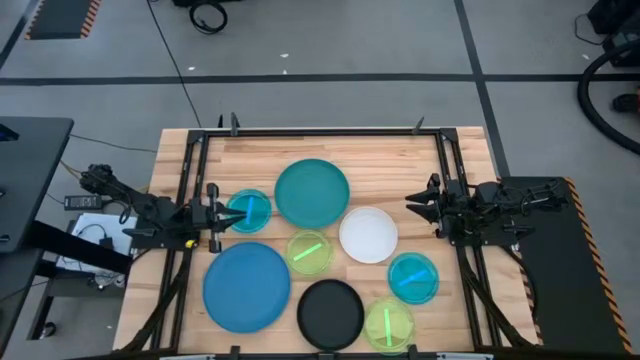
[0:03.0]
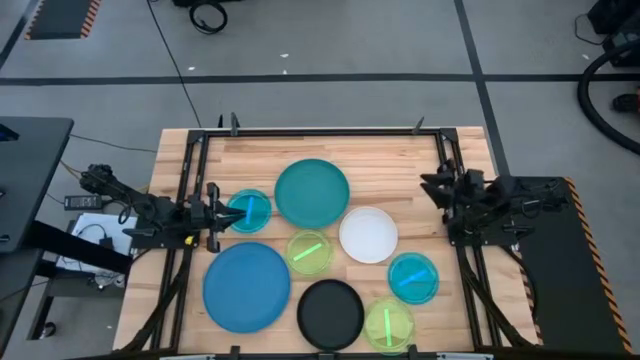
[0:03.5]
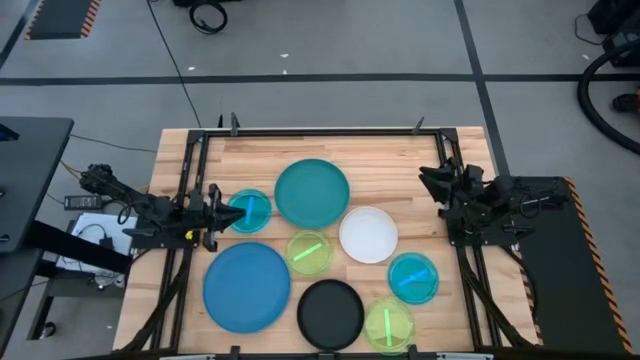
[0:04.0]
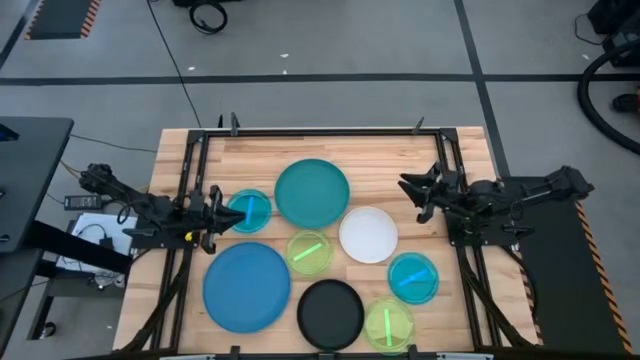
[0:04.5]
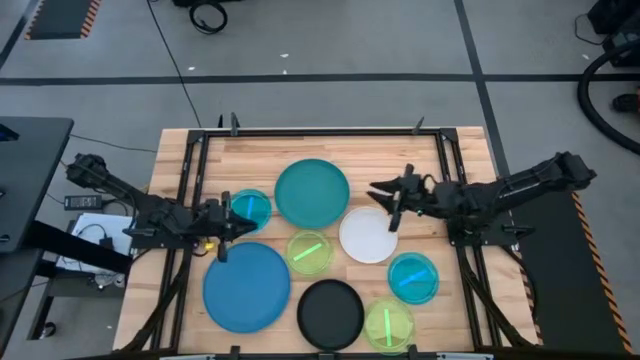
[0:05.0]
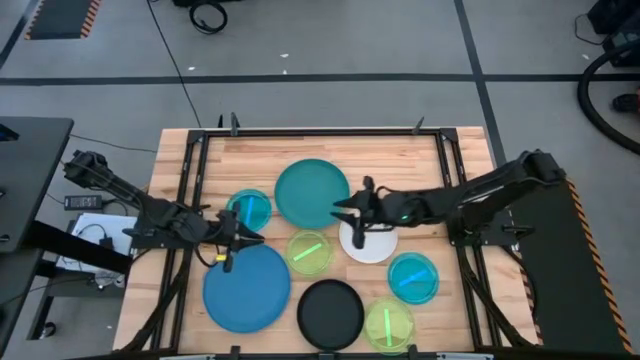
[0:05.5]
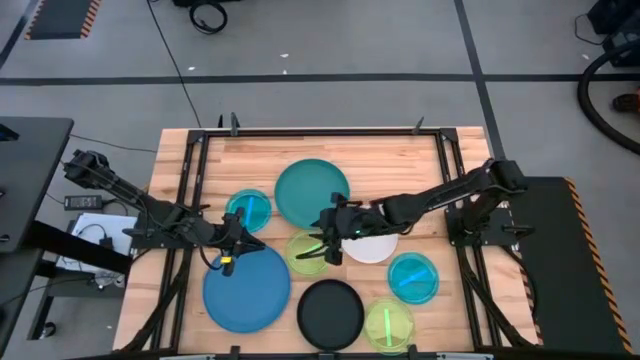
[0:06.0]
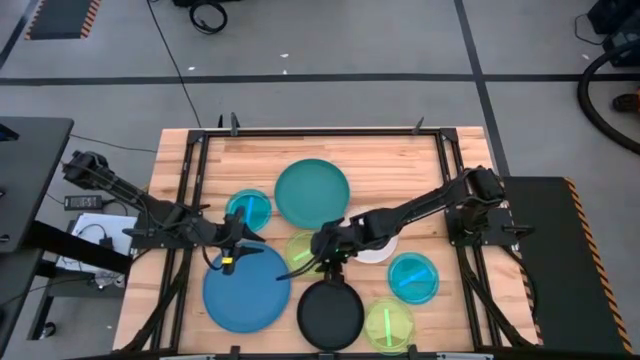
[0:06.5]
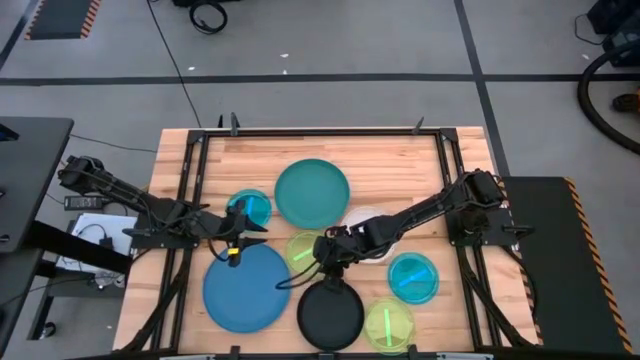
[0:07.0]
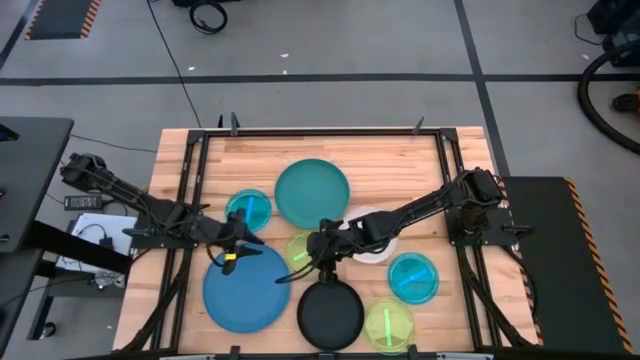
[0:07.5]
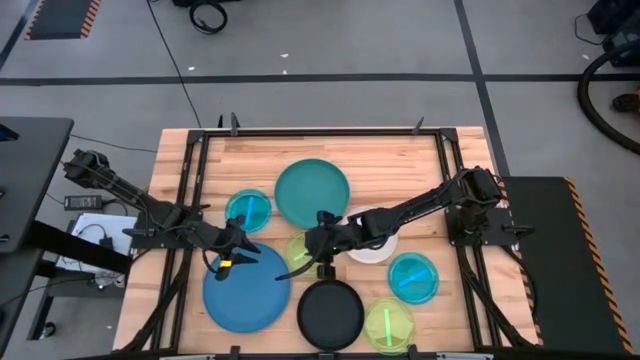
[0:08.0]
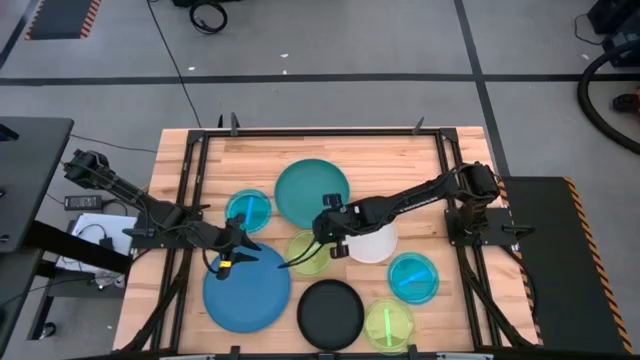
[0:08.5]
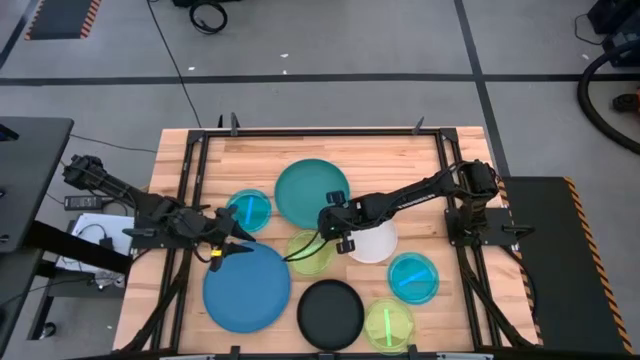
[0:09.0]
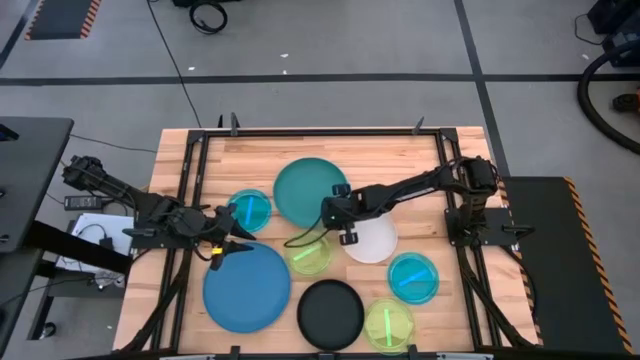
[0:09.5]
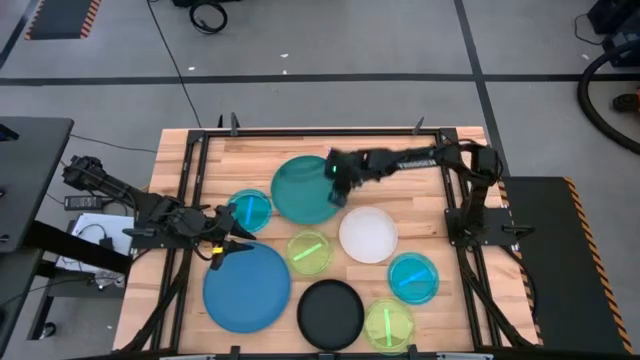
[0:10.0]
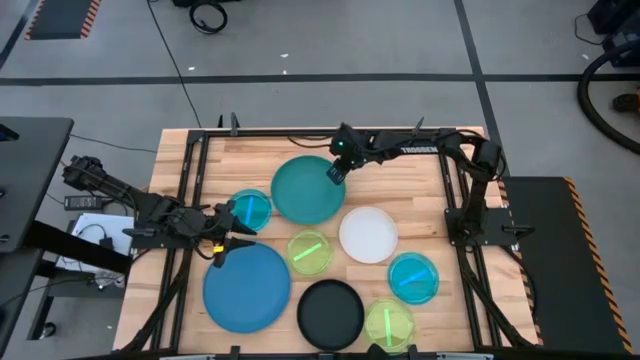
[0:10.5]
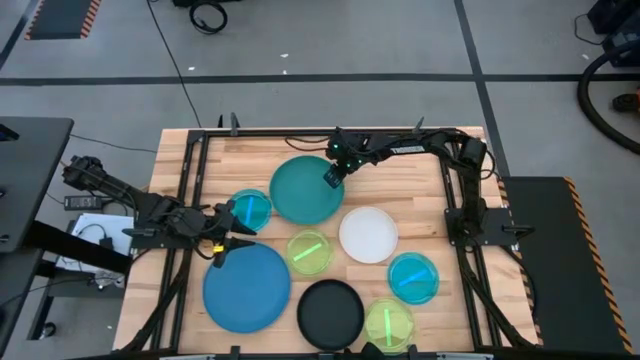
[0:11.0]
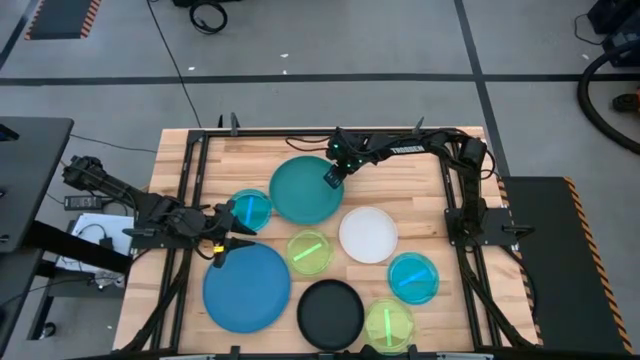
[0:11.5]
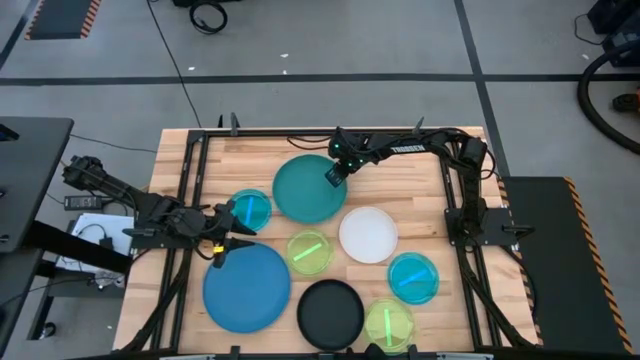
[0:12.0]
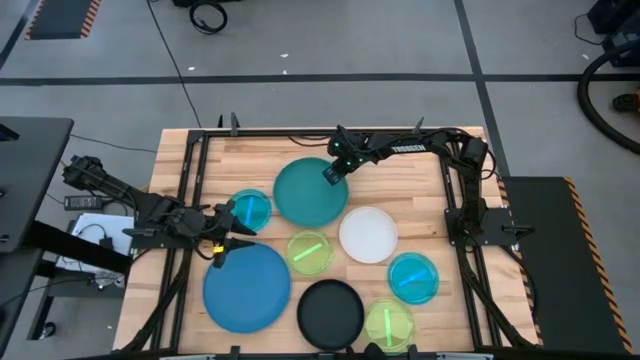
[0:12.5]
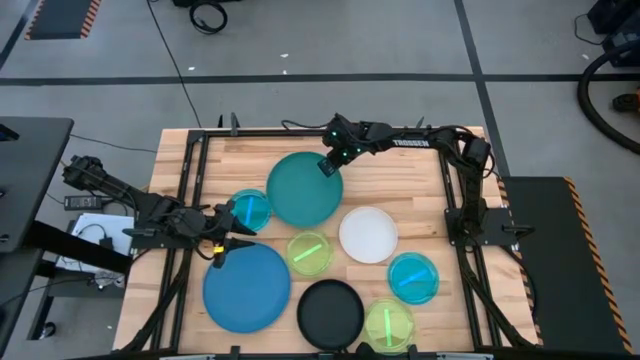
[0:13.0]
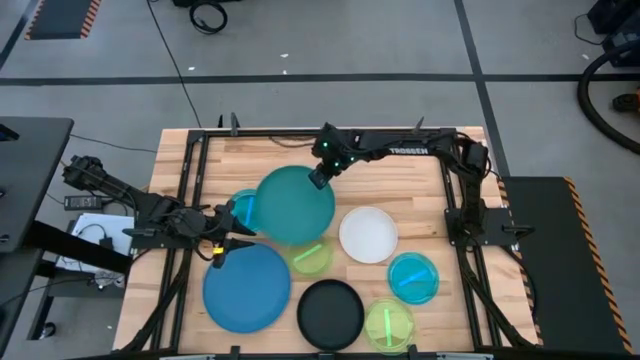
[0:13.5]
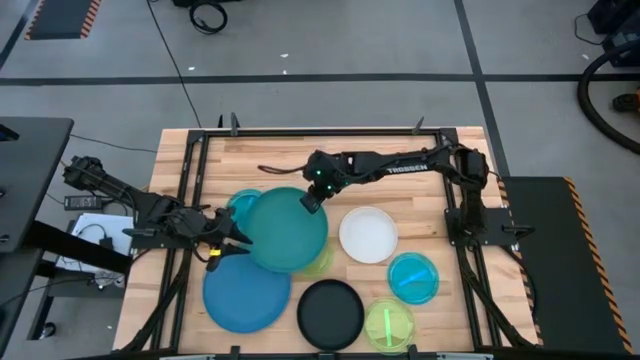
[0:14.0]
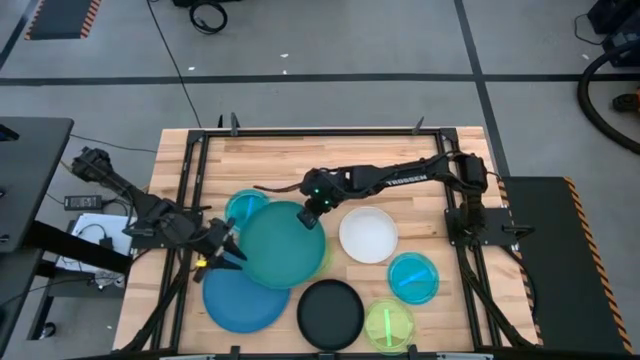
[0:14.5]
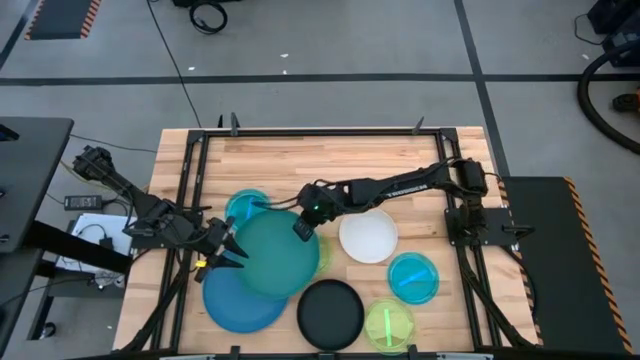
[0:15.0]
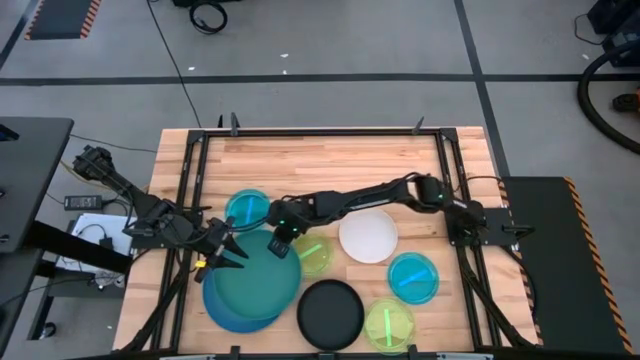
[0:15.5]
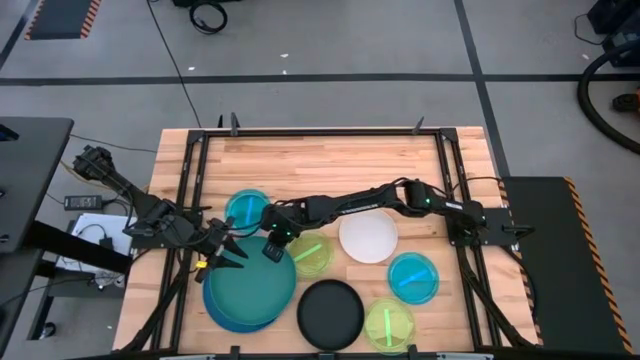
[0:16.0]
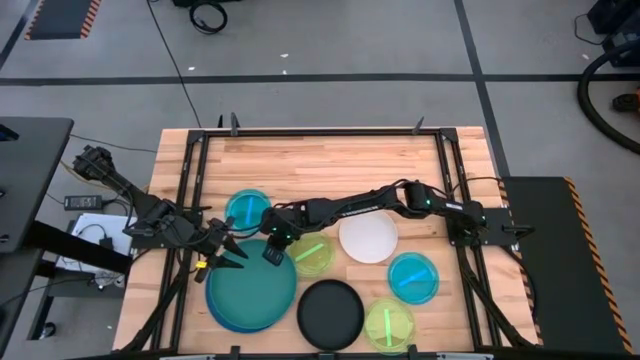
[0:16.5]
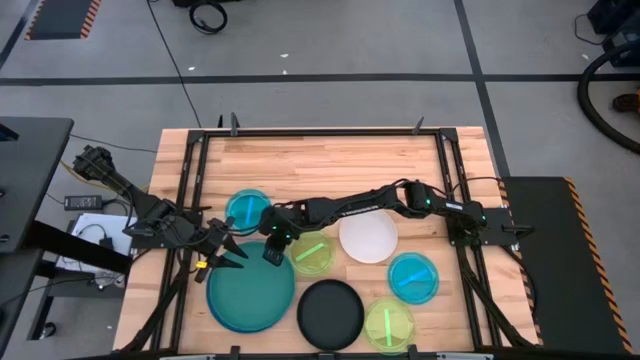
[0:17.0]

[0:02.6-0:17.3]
Task: Stack plastic plates
Stack the green plate on the blue plate

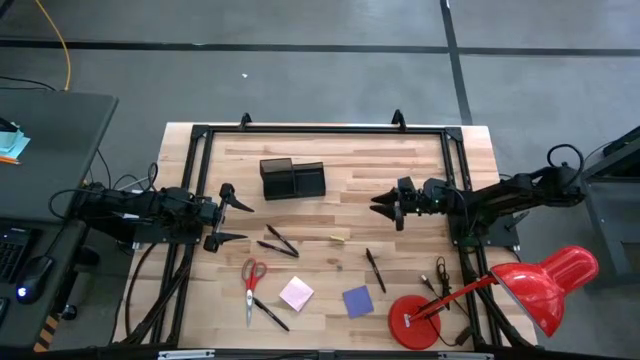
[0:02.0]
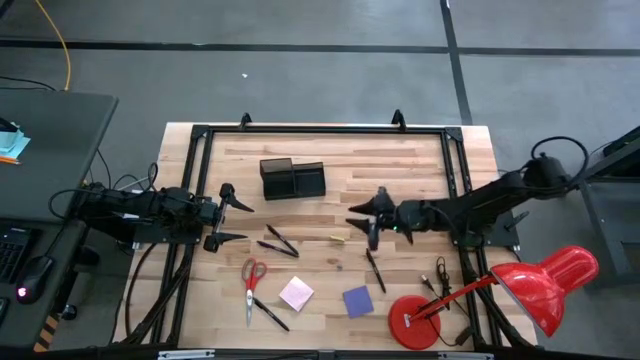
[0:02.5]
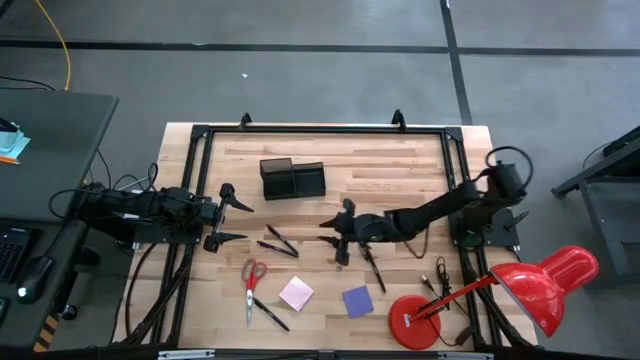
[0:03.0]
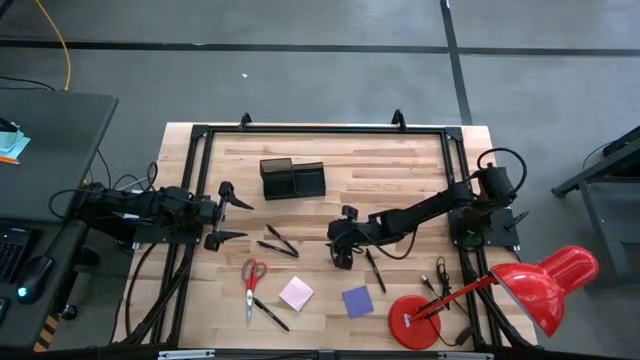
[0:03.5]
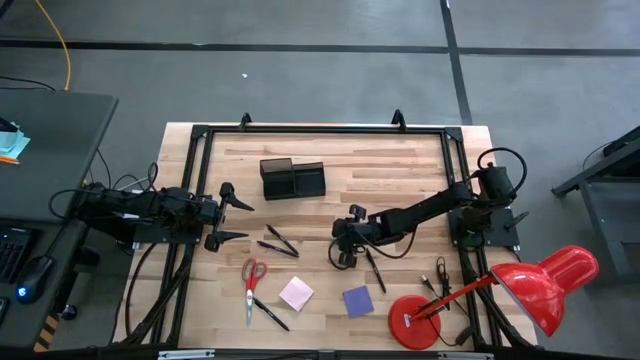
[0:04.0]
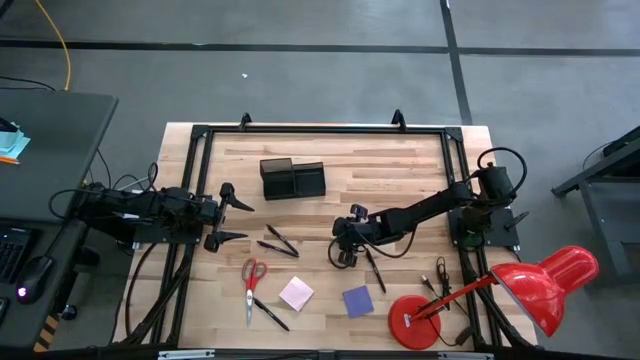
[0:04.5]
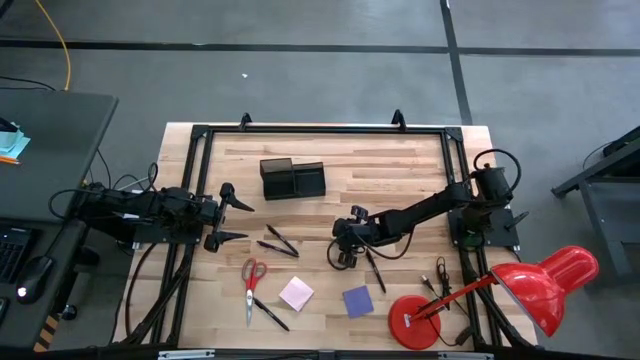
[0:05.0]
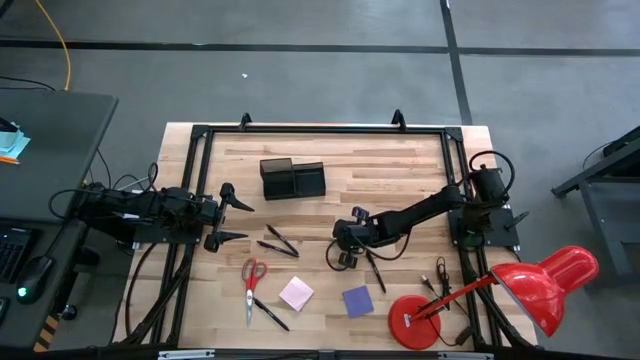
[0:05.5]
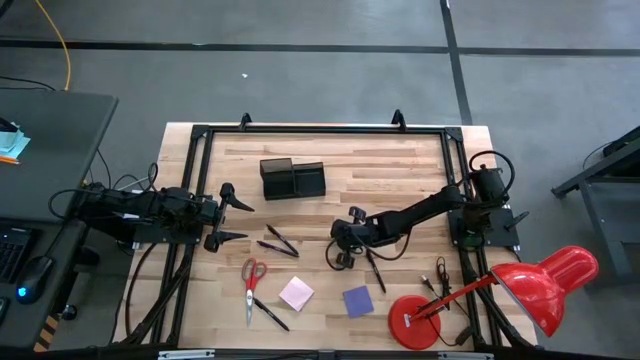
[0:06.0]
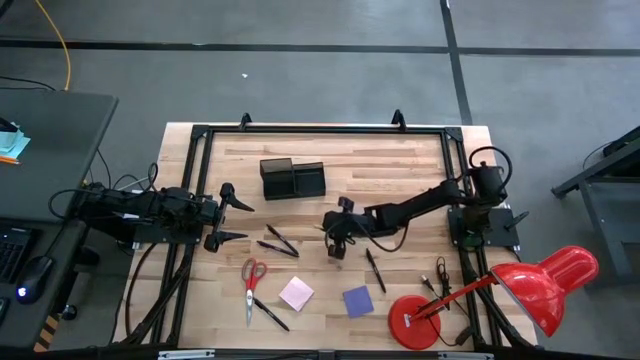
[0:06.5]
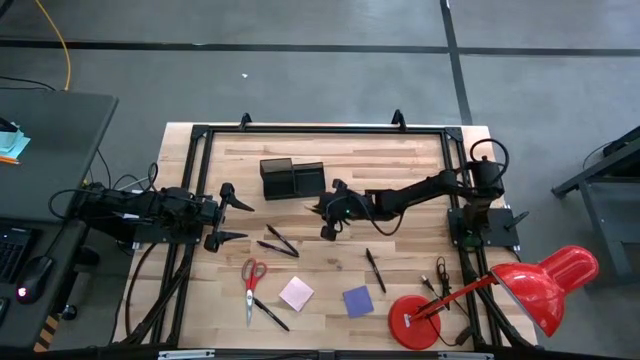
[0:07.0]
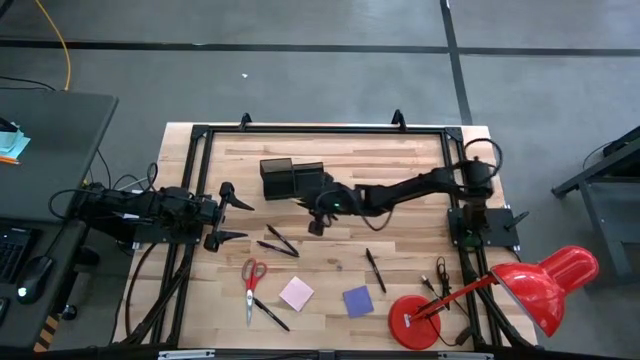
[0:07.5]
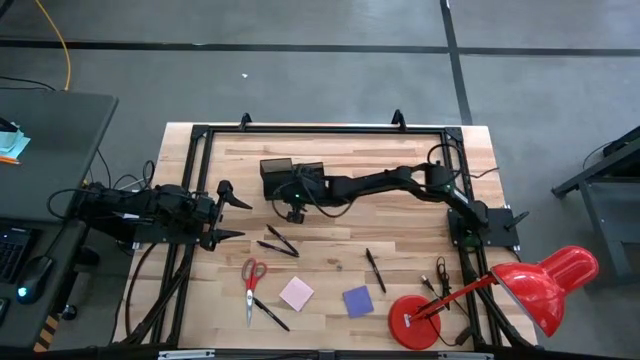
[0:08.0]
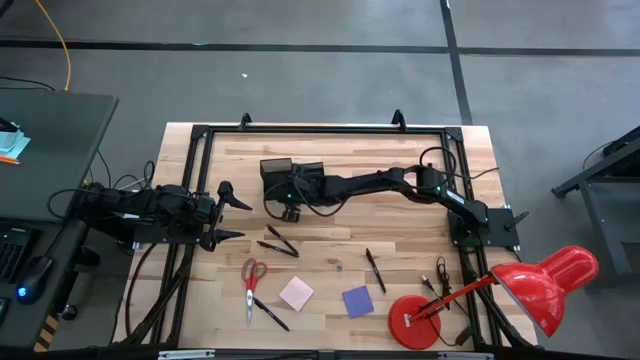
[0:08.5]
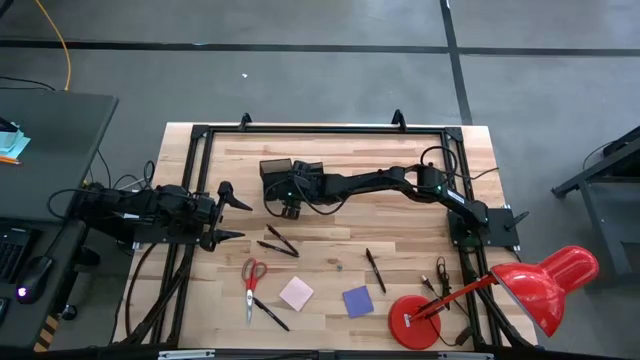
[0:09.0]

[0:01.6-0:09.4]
Task: Pick and place office supplies into organizer
Put the yellow eraser into the black desk organizer
